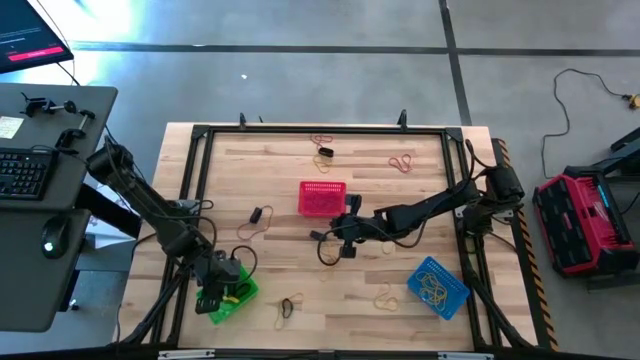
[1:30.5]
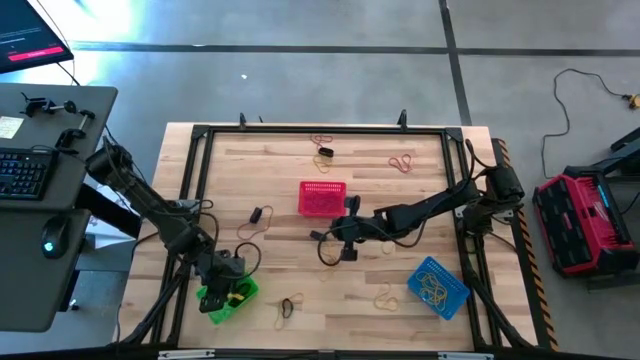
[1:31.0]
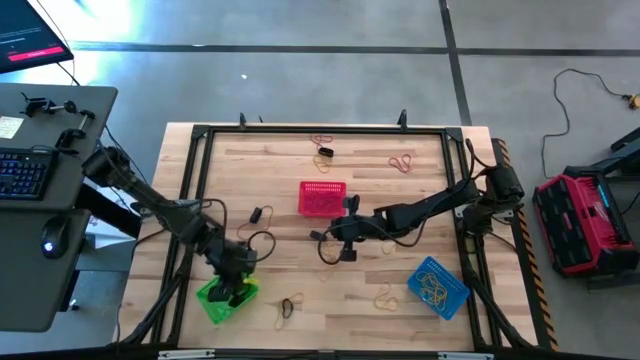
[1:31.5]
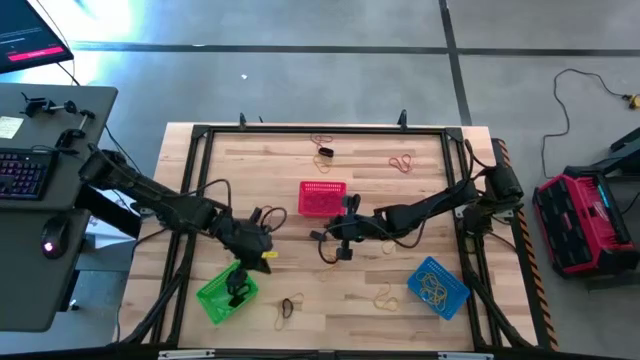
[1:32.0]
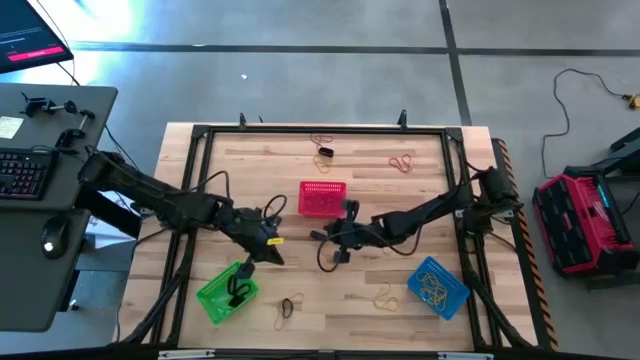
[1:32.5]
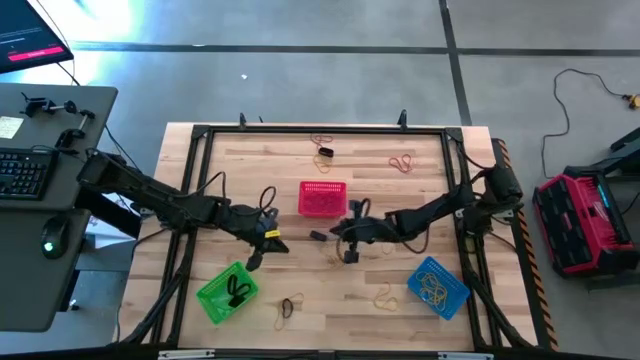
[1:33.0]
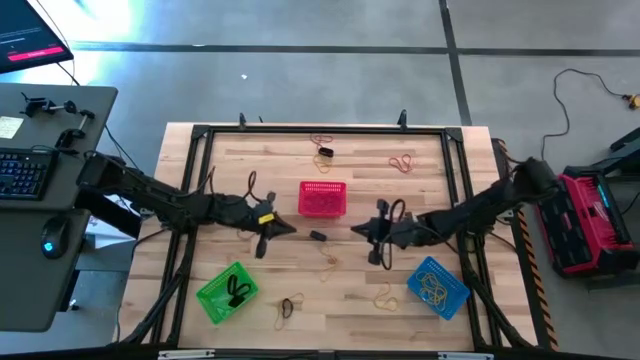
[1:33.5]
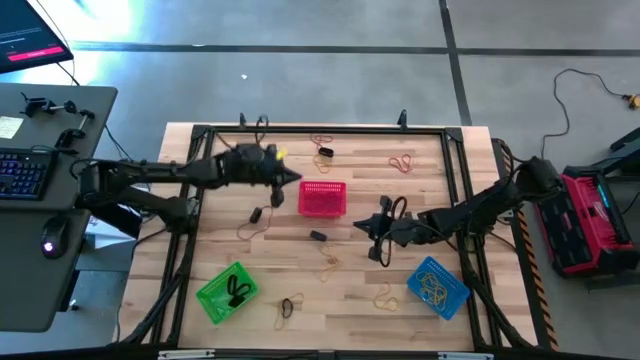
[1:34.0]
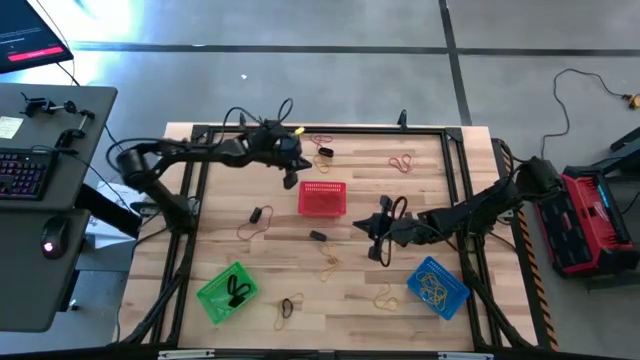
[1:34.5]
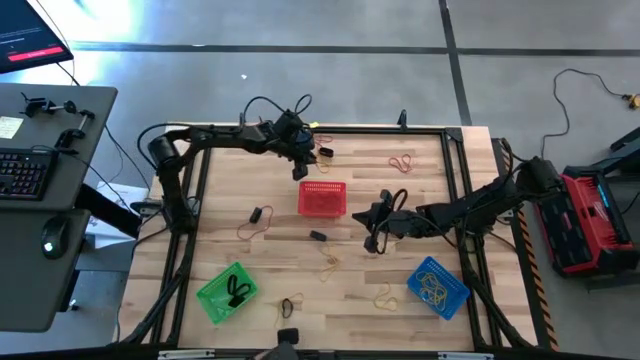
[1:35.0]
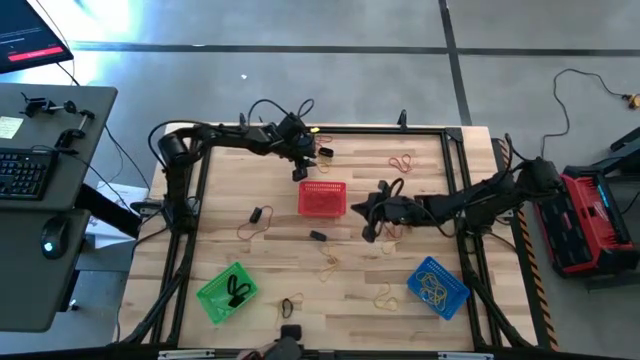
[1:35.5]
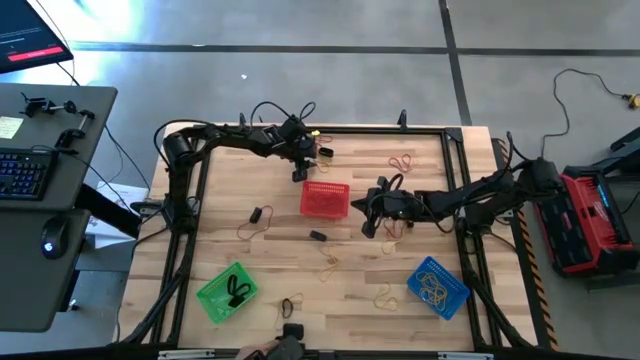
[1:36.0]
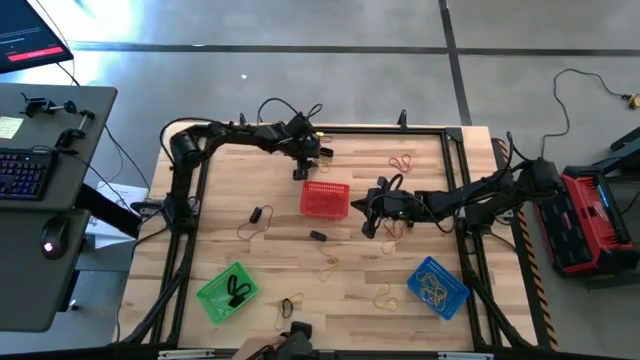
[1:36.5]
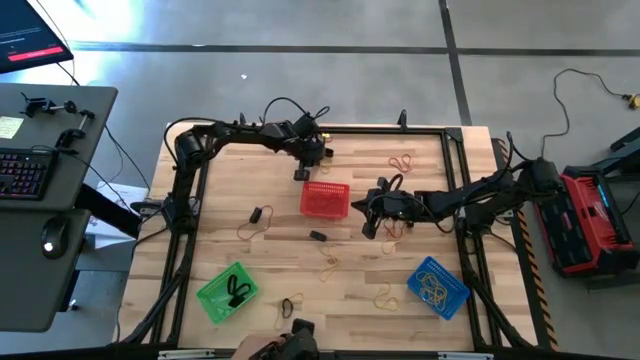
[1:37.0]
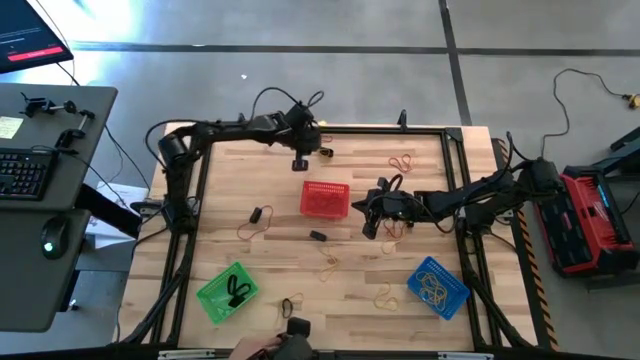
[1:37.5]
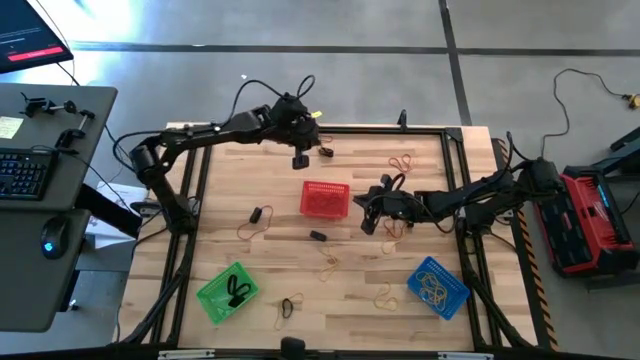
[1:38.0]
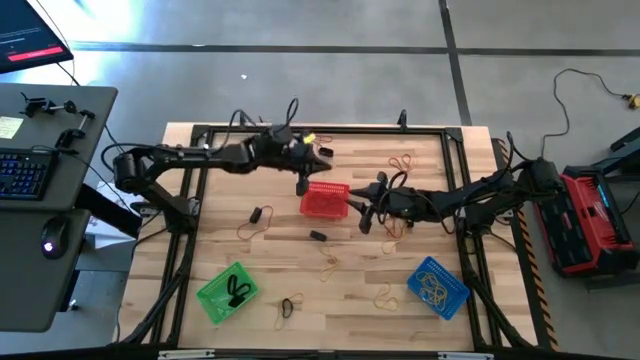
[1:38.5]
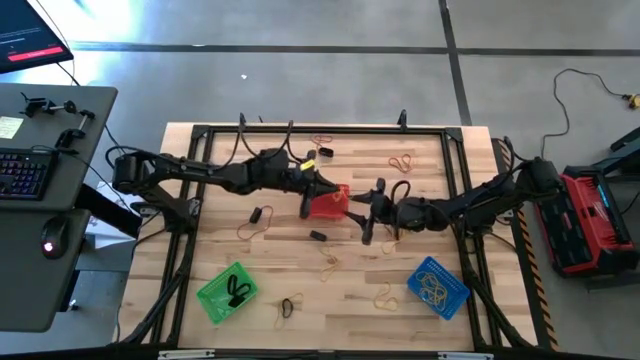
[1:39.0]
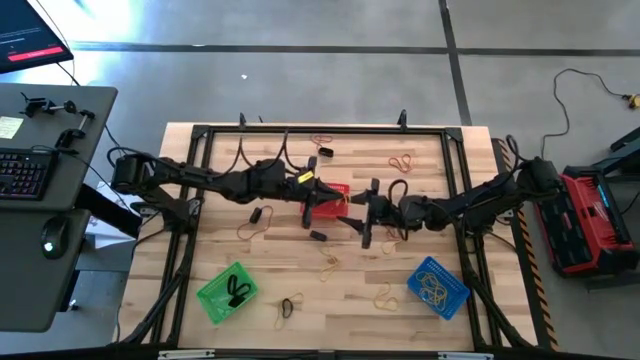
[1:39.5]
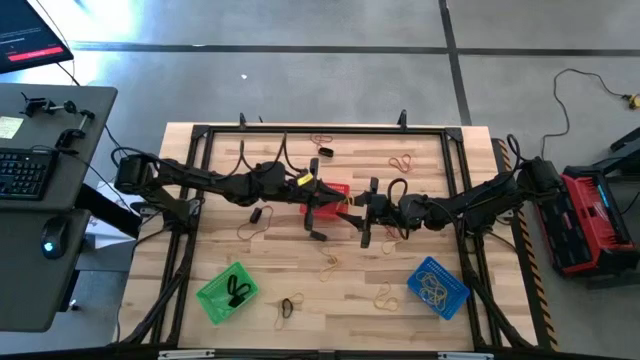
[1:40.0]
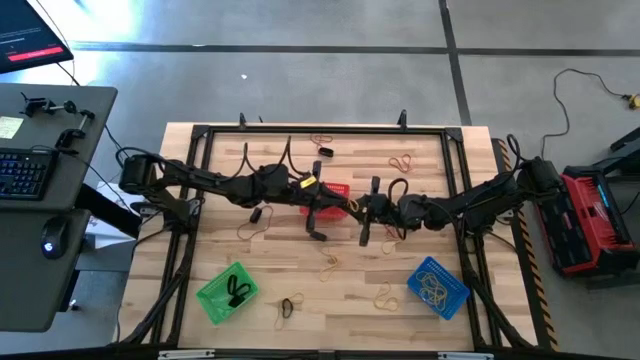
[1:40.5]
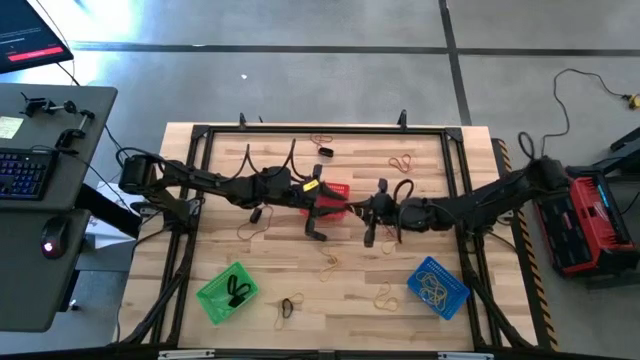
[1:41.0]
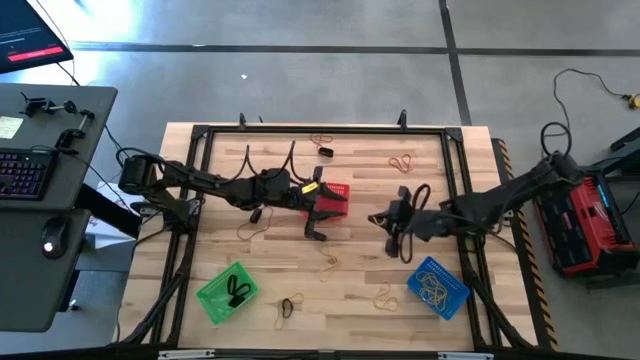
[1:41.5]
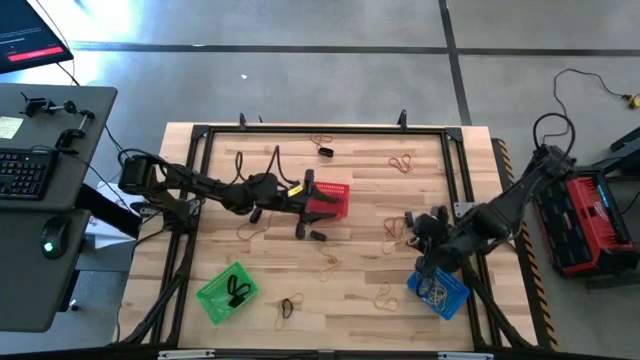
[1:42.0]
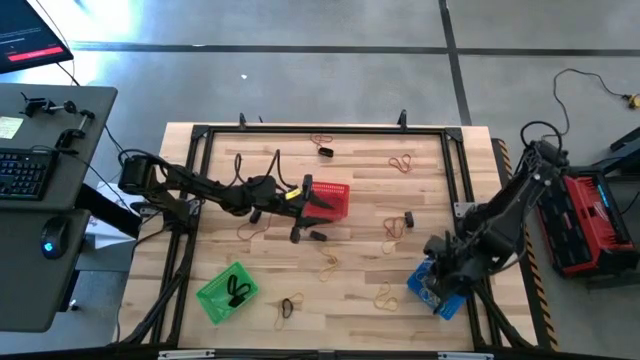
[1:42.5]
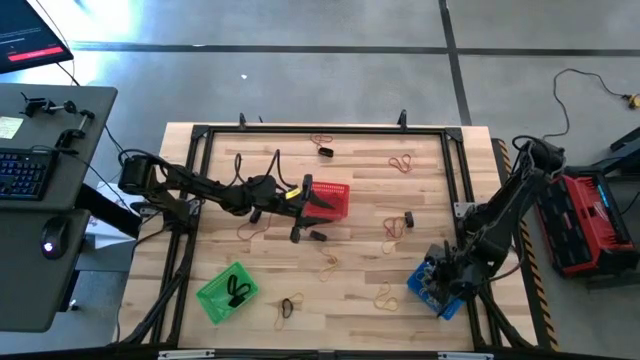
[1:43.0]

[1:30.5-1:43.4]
Task: Sort rubber bands into baskets
Put the yellow rubber band into the blue bin

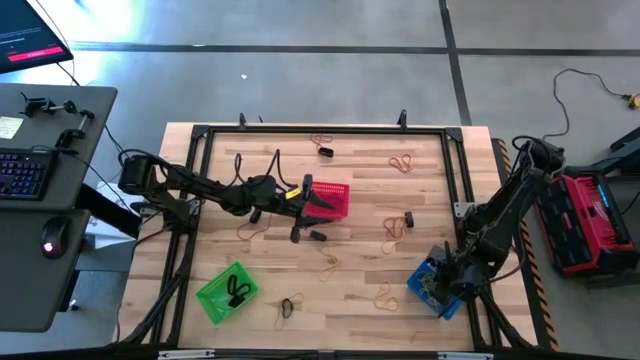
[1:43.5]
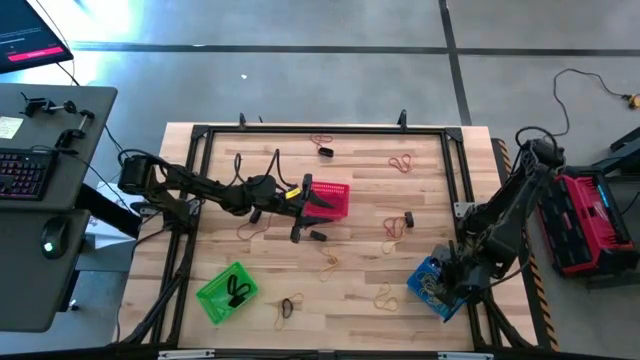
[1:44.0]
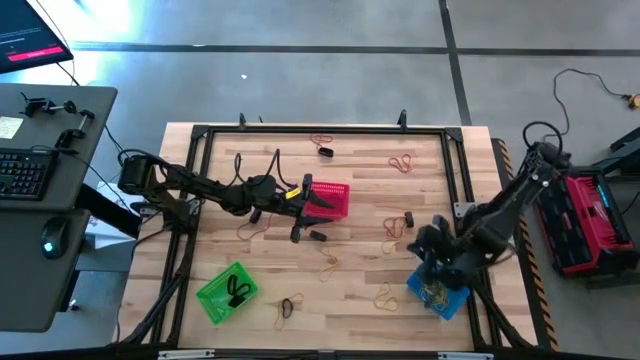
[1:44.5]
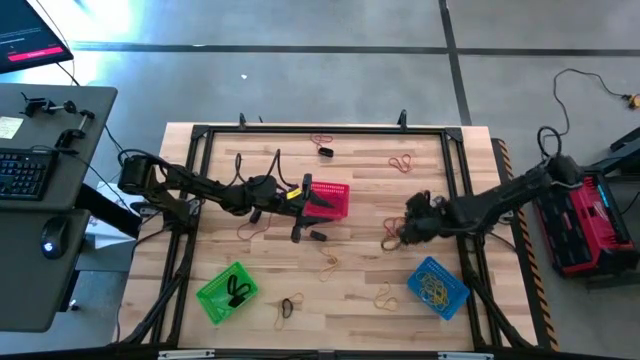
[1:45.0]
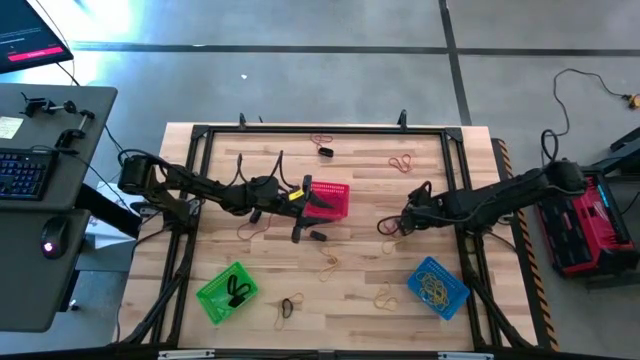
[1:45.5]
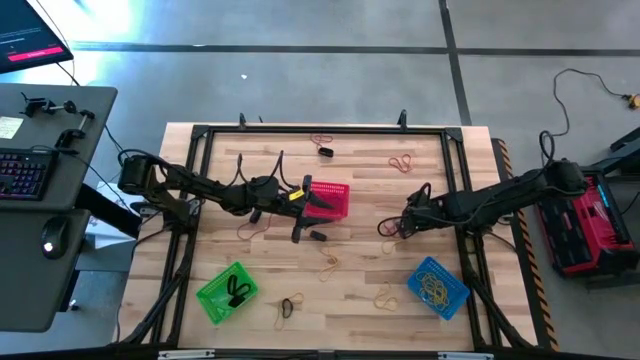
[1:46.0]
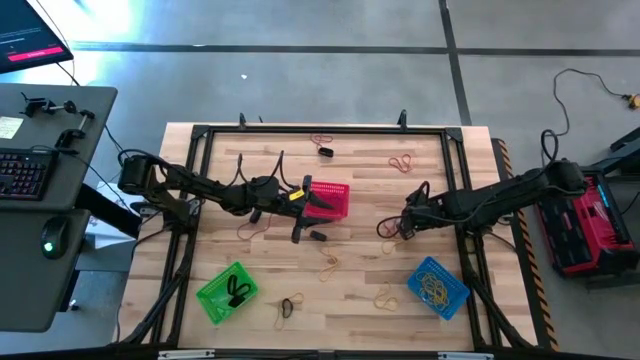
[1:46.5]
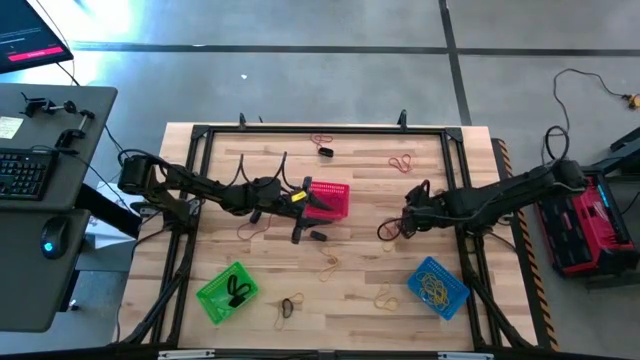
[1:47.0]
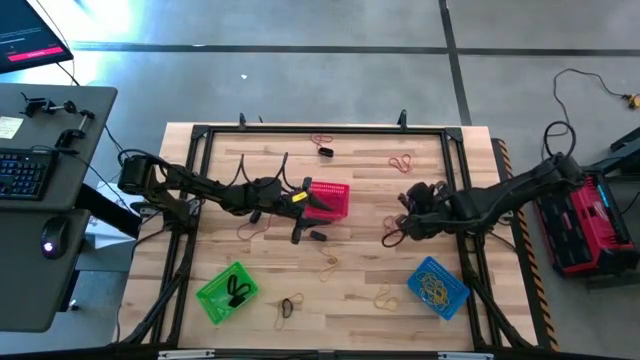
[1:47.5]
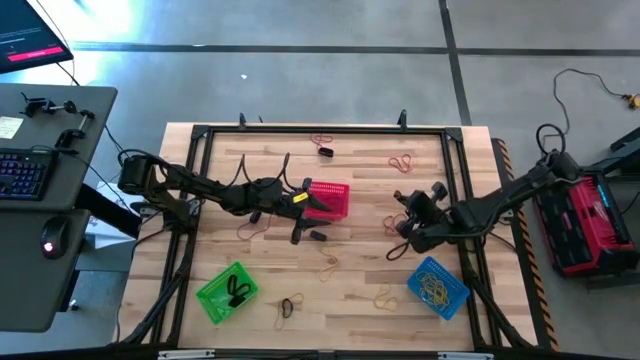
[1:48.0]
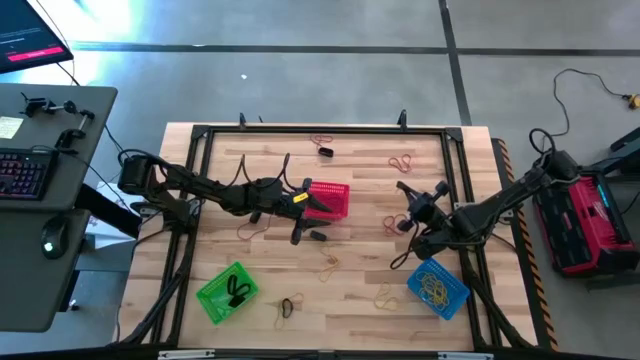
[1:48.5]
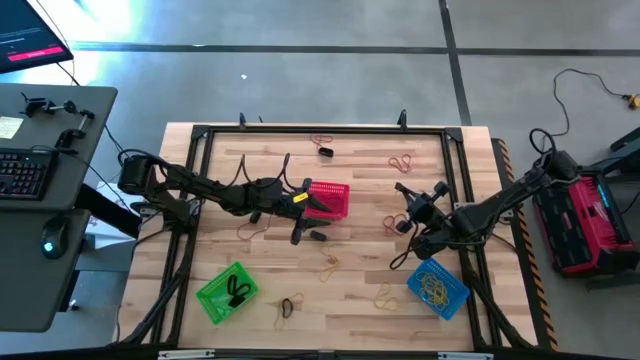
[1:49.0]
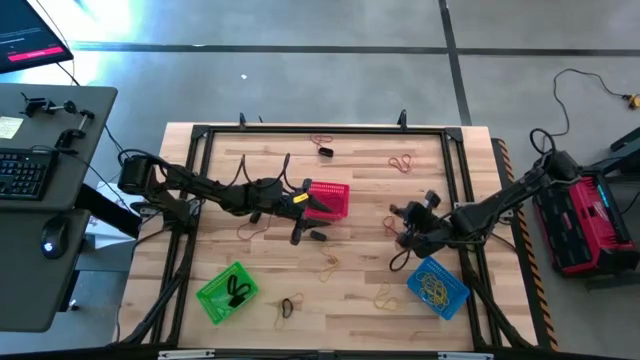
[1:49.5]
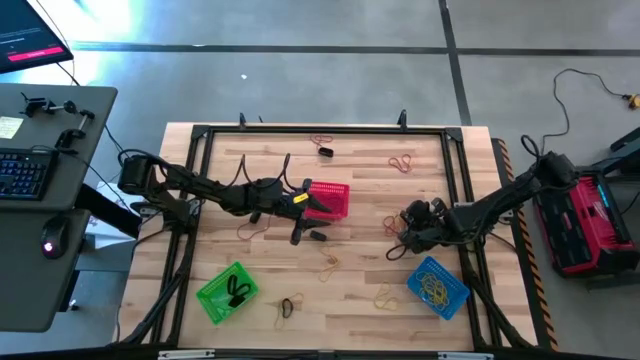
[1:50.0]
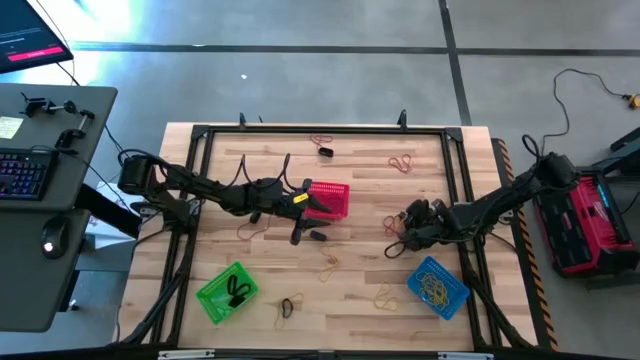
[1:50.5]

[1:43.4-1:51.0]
Put the black rubber band into the green bin
